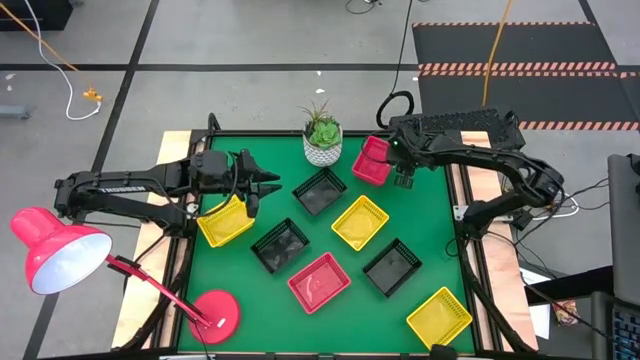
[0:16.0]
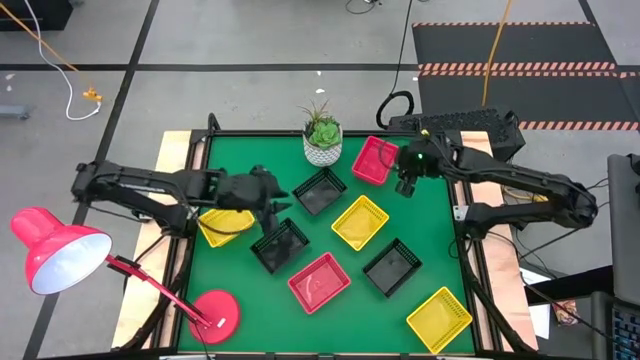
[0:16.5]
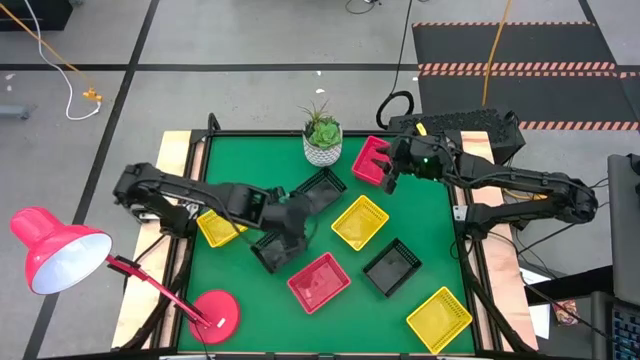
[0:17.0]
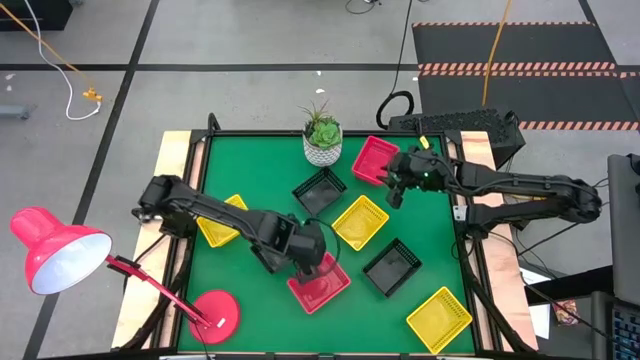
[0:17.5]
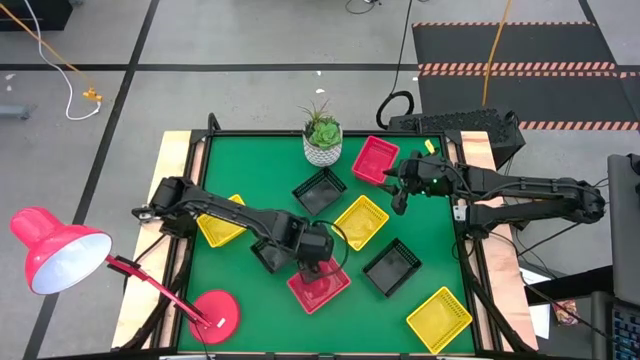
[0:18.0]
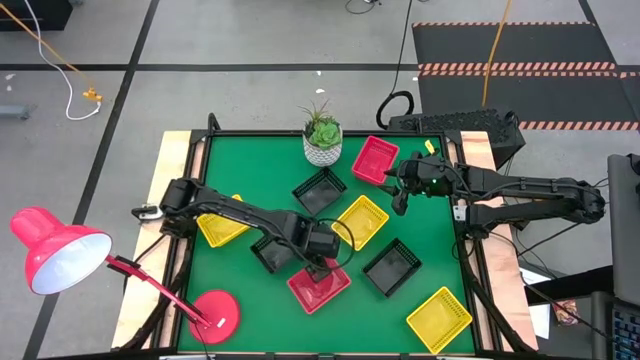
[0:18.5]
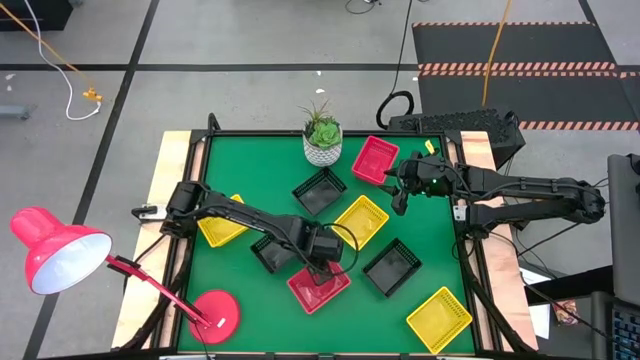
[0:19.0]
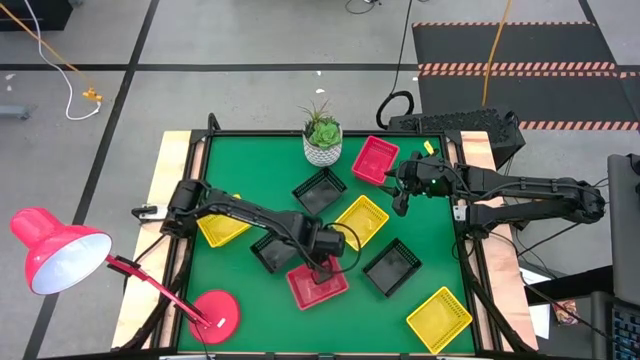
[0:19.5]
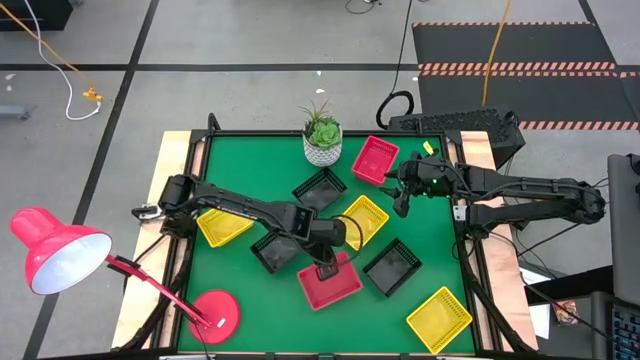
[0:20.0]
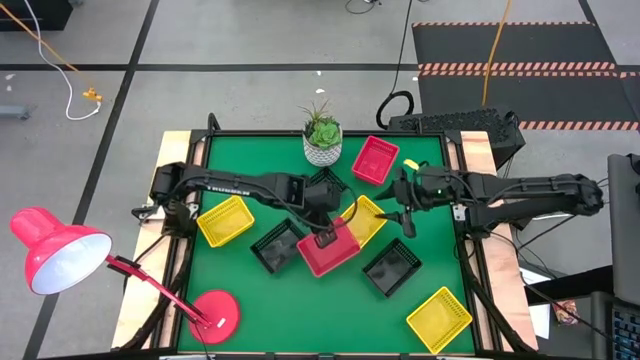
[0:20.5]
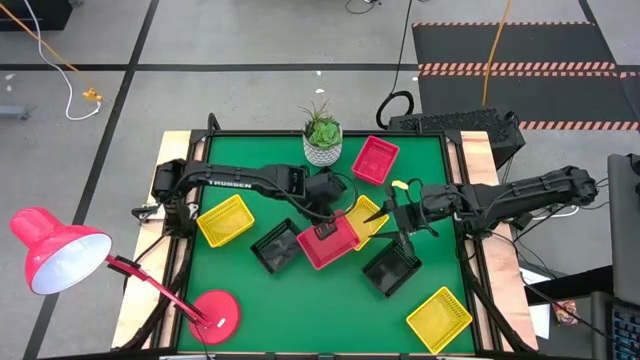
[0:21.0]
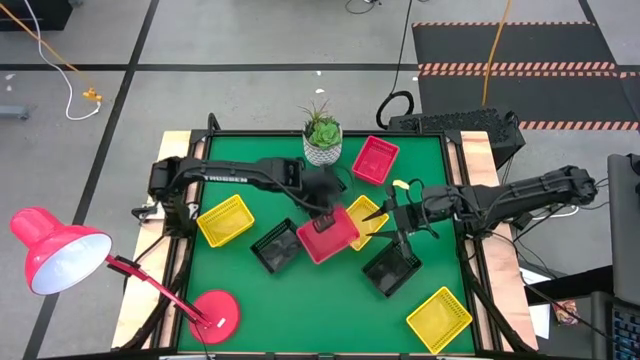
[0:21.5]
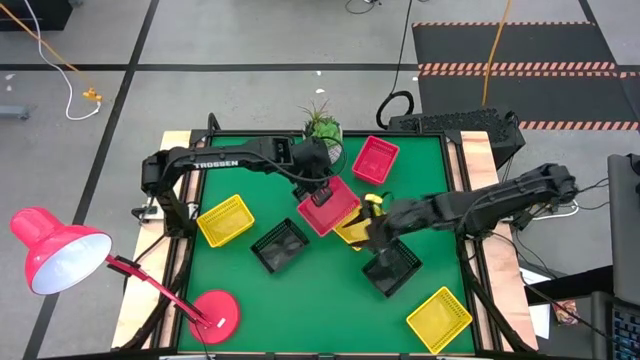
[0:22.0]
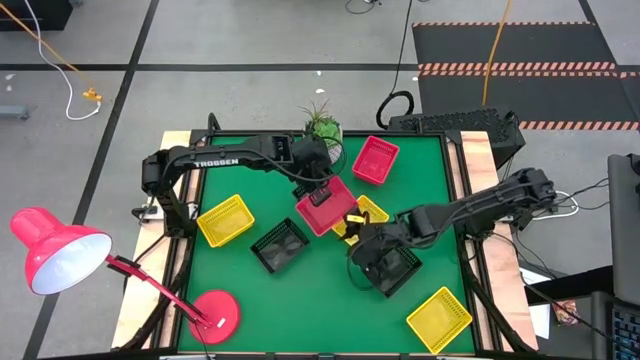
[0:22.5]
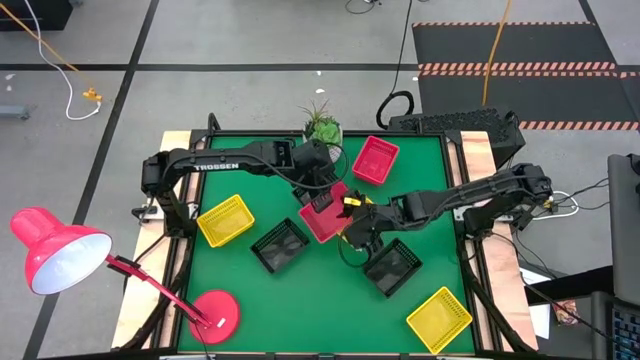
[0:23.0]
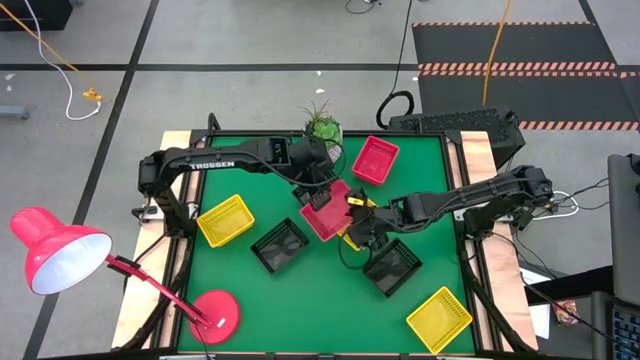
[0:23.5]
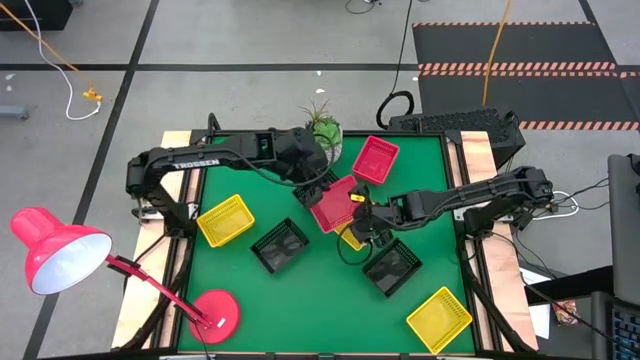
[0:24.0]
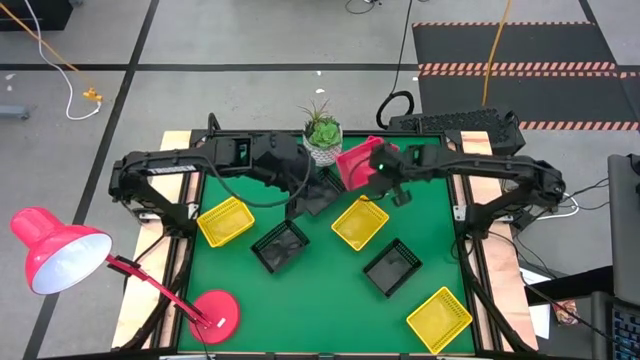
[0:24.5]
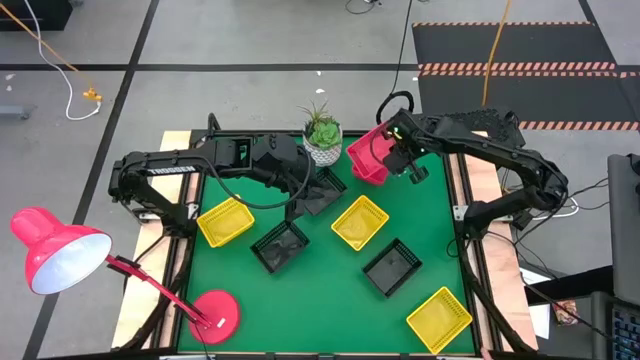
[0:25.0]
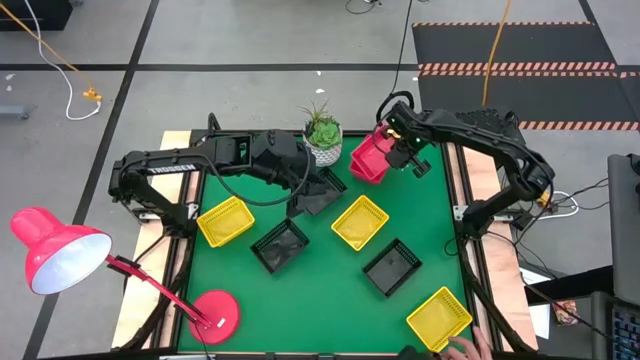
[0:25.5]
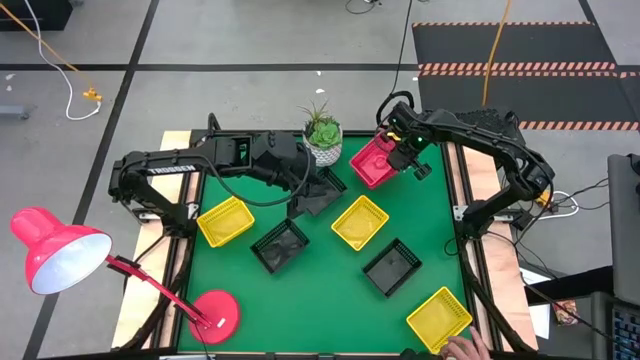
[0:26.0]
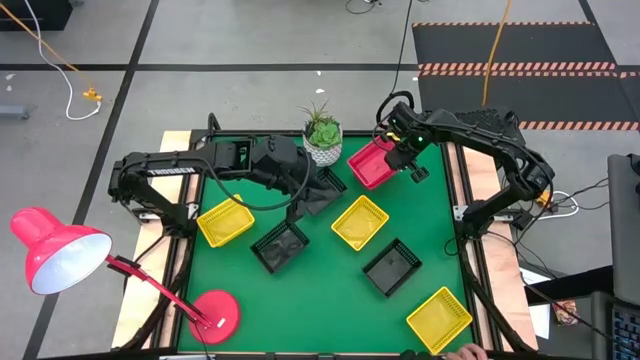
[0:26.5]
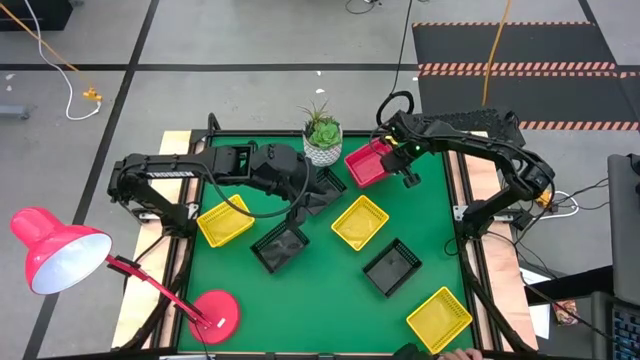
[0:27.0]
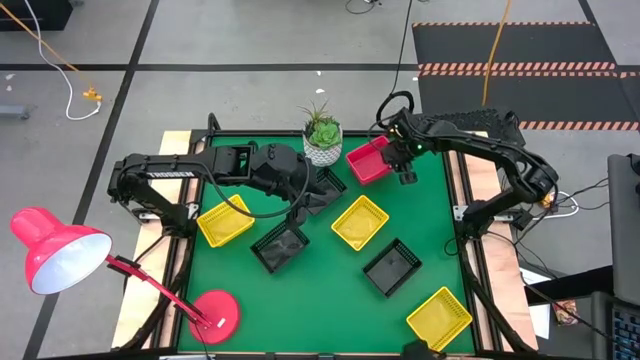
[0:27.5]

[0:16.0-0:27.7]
Stack the bottom orange bin on the top orange bins
